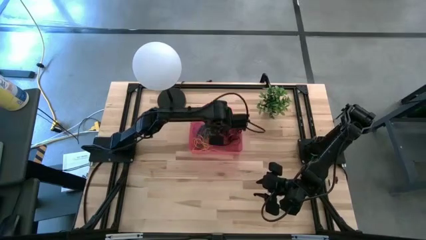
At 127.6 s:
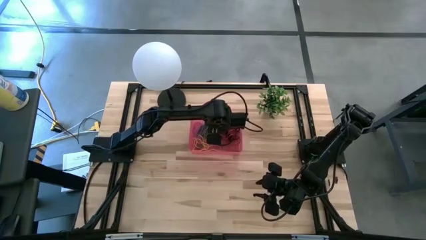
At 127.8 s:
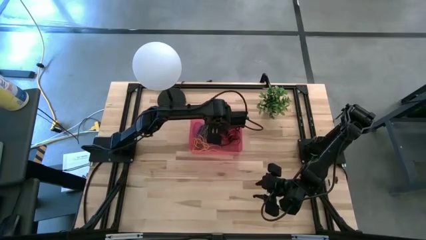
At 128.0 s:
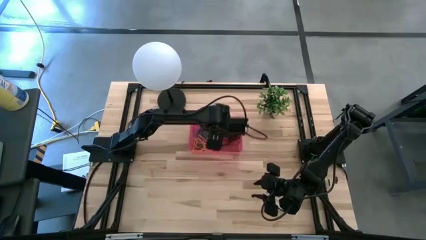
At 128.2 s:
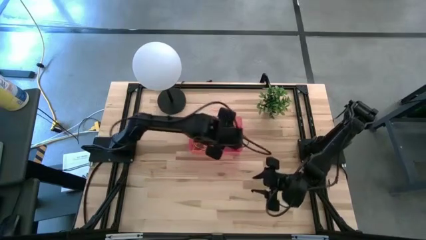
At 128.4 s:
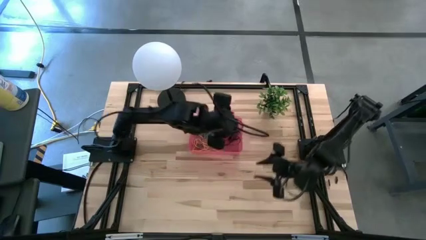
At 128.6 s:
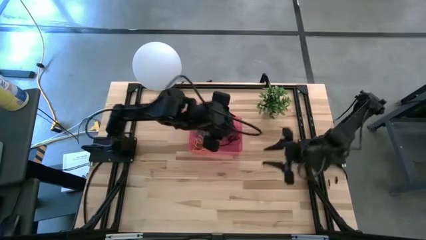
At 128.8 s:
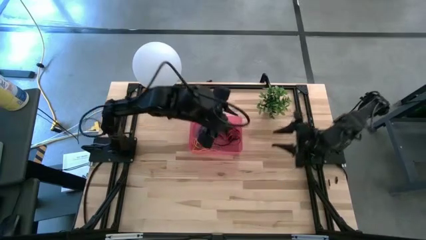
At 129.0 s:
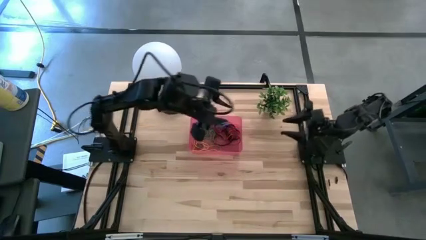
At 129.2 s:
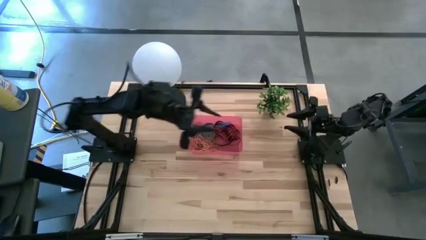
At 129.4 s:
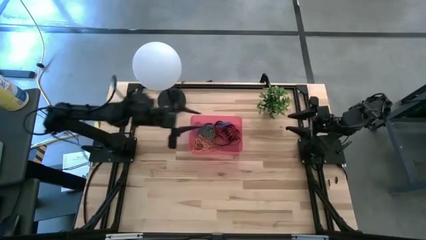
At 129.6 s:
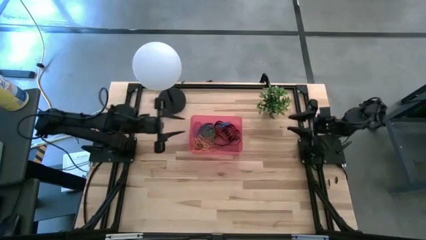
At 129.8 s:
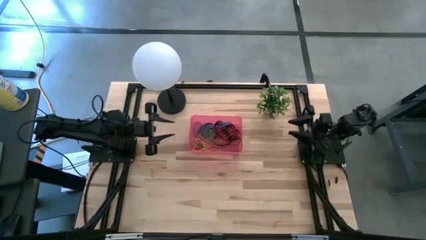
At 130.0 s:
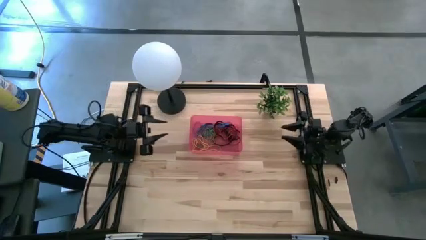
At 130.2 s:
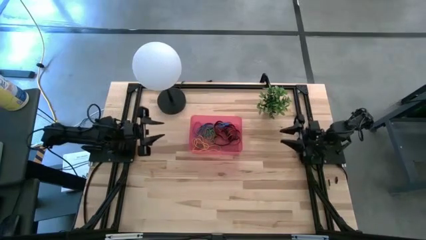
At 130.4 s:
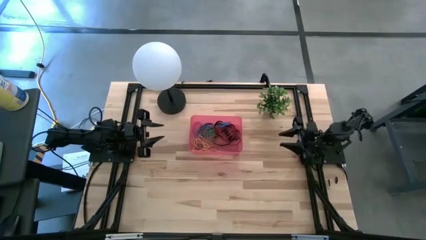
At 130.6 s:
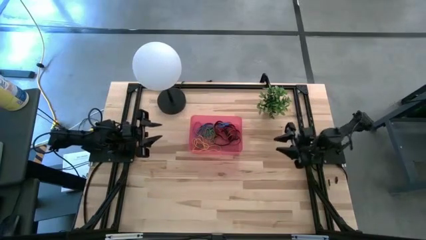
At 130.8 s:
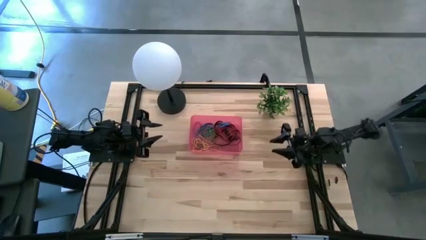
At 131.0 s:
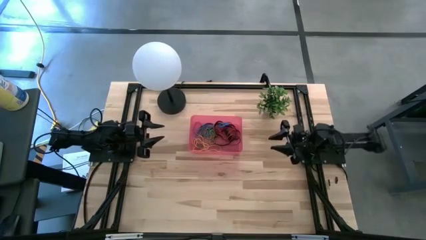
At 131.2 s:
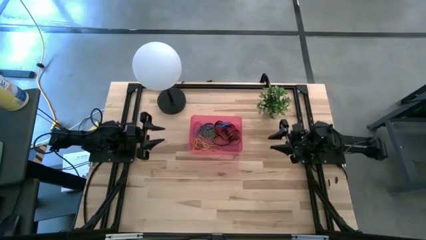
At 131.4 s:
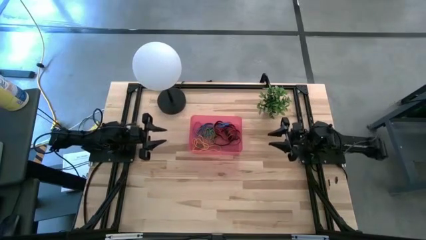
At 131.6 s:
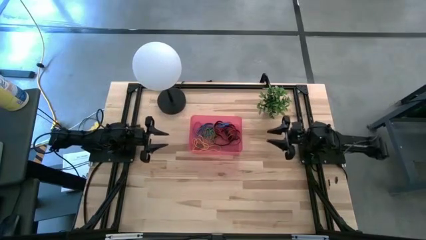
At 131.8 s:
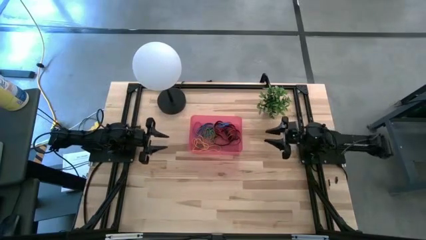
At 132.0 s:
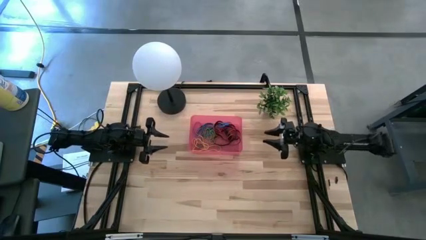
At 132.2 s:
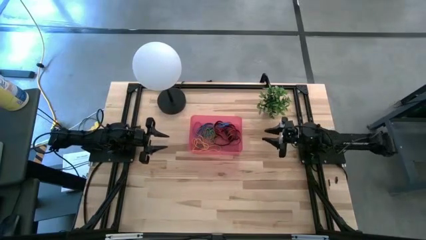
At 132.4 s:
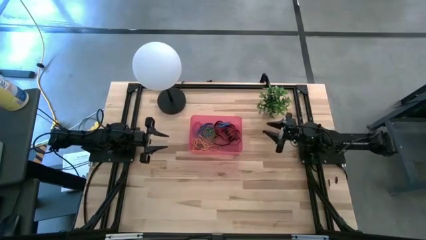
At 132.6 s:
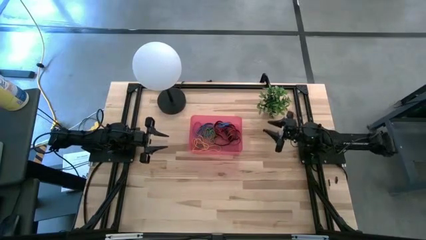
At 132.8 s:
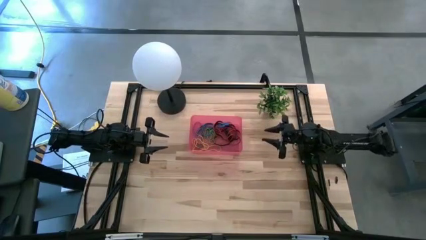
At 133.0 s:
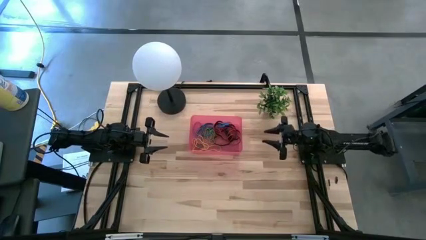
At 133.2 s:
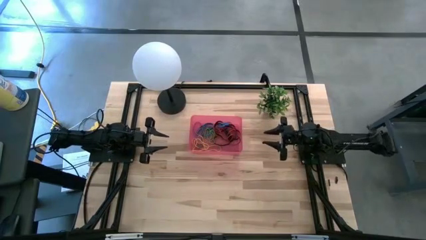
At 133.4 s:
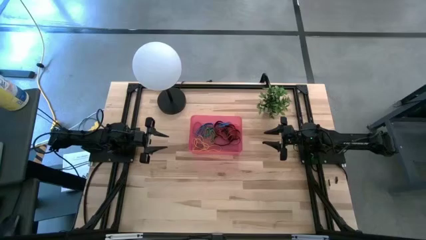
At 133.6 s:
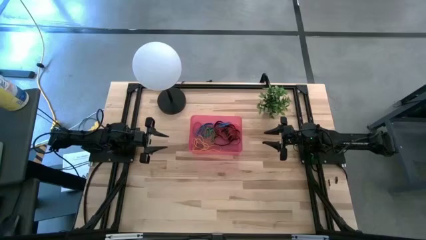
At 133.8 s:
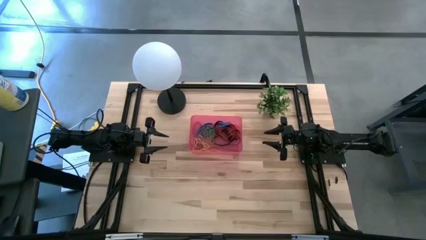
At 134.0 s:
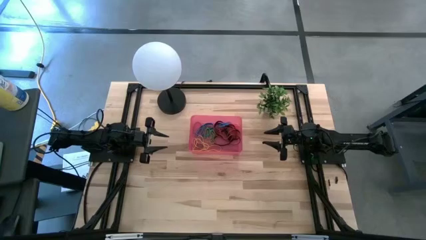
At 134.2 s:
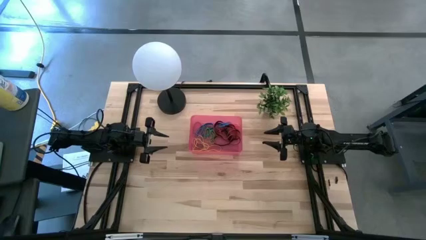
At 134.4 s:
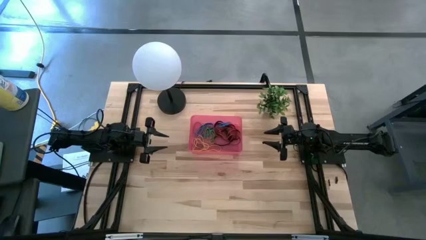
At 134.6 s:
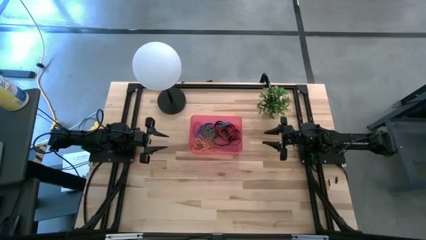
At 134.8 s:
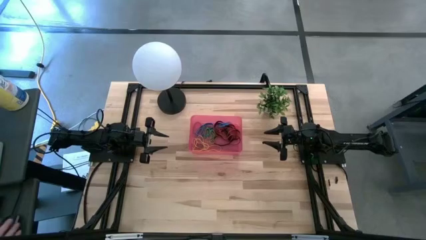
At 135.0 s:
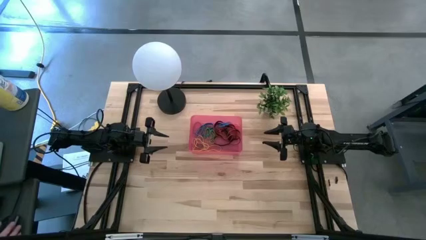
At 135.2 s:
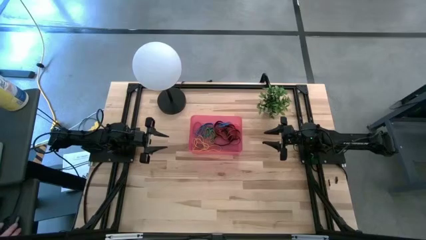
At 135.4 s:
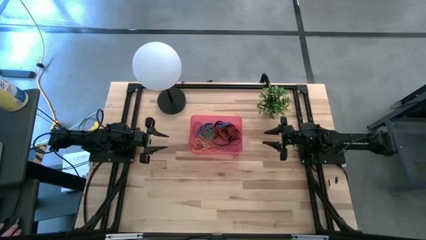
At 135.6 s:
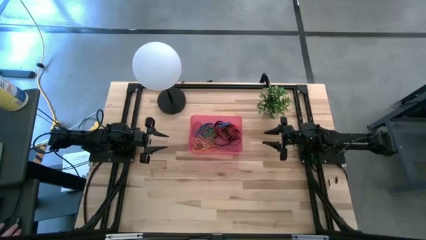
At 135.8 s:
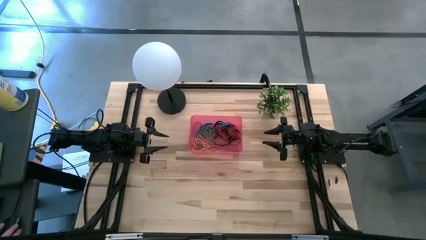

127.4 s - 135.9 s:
Task: Pick and place rubber bands into bin
Return to Home Position

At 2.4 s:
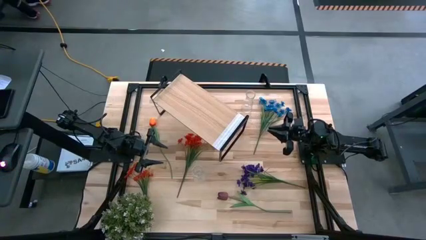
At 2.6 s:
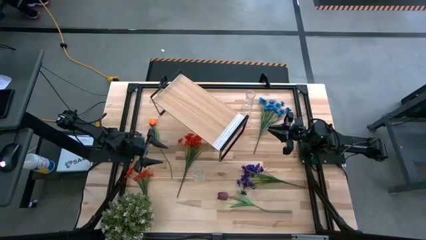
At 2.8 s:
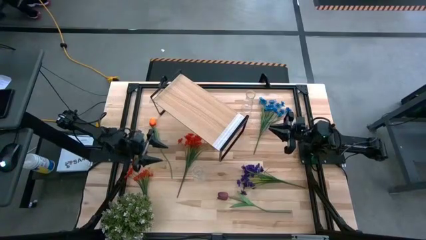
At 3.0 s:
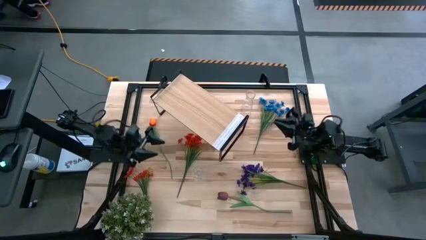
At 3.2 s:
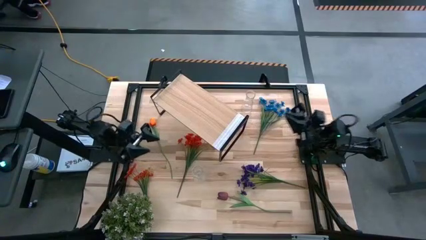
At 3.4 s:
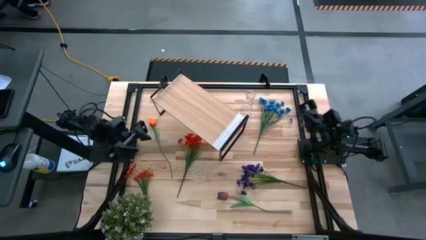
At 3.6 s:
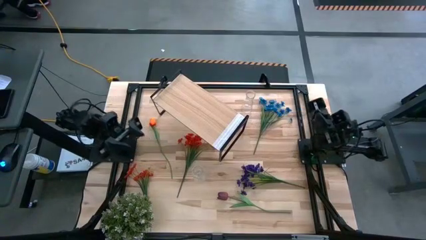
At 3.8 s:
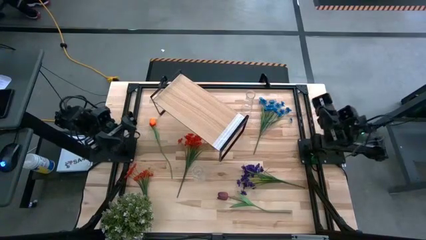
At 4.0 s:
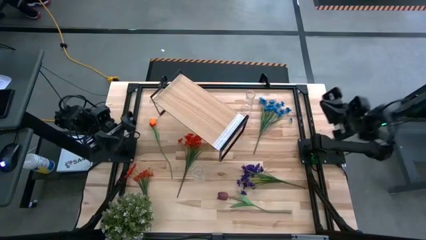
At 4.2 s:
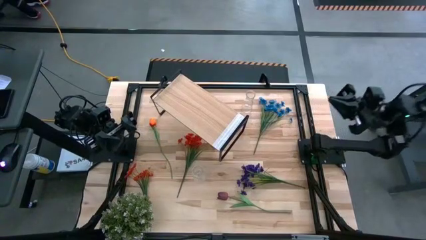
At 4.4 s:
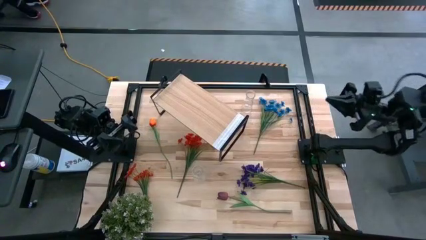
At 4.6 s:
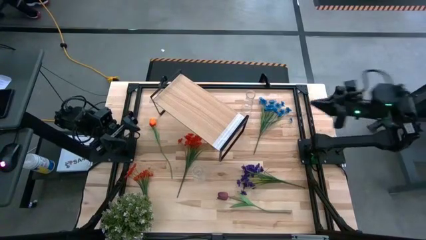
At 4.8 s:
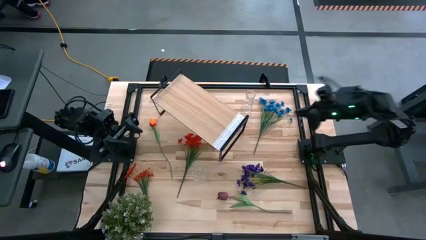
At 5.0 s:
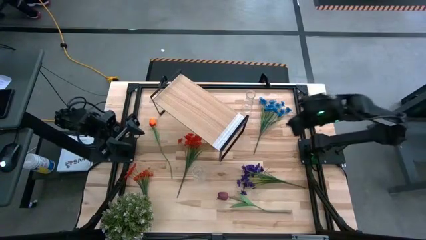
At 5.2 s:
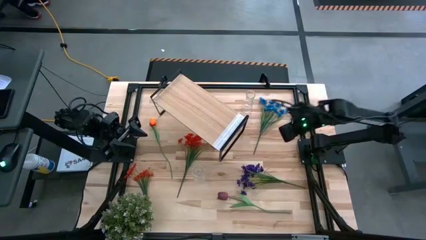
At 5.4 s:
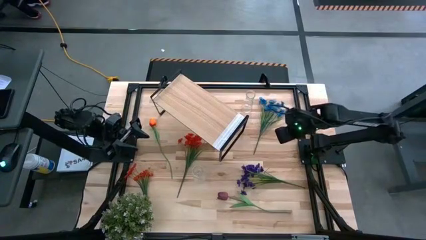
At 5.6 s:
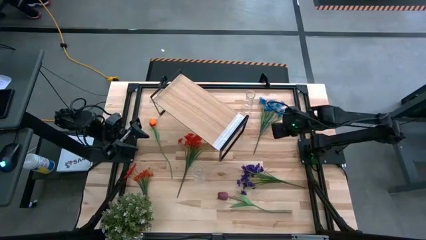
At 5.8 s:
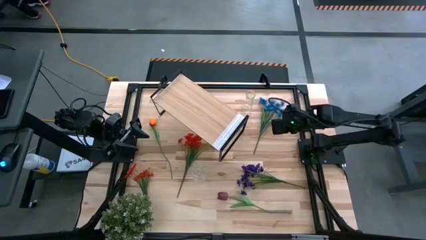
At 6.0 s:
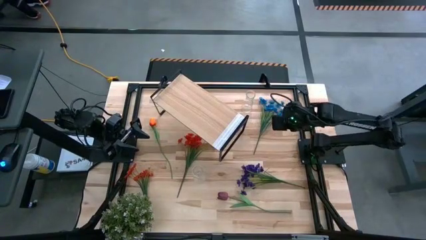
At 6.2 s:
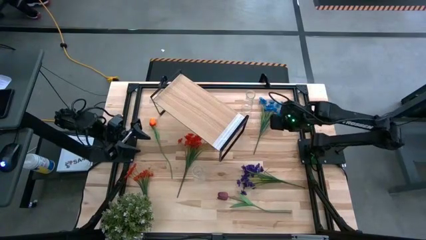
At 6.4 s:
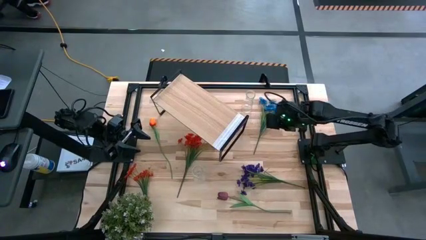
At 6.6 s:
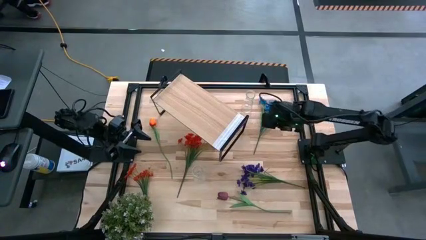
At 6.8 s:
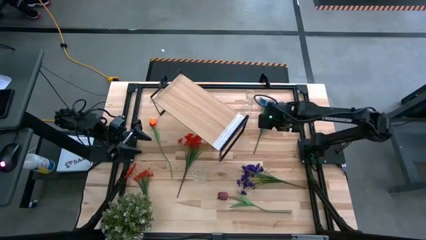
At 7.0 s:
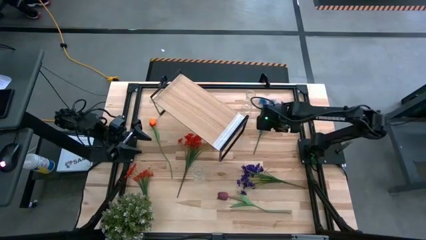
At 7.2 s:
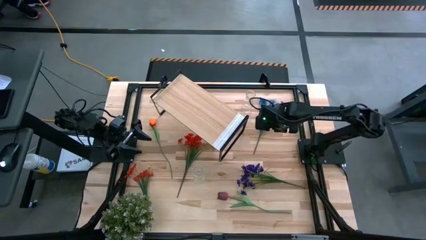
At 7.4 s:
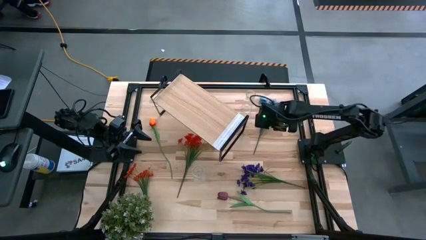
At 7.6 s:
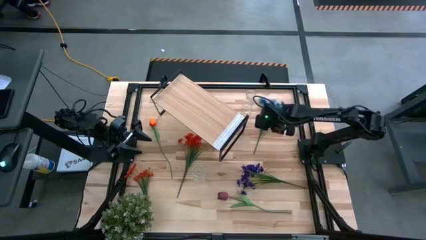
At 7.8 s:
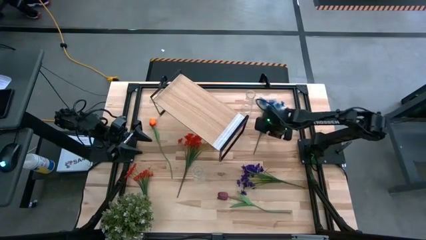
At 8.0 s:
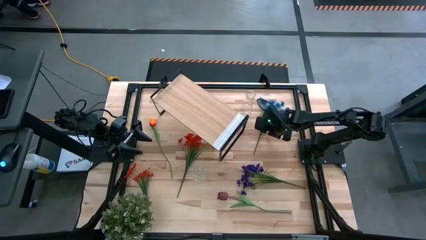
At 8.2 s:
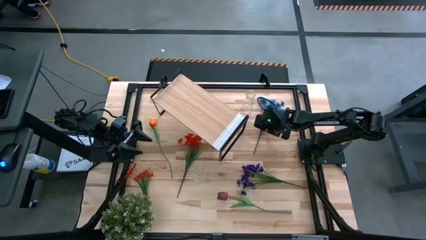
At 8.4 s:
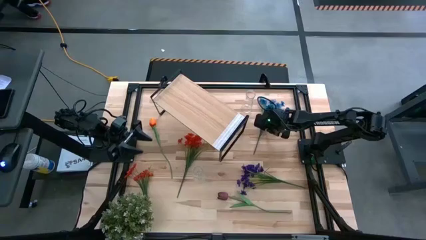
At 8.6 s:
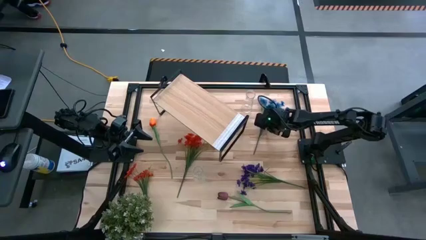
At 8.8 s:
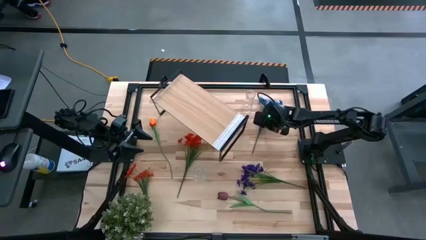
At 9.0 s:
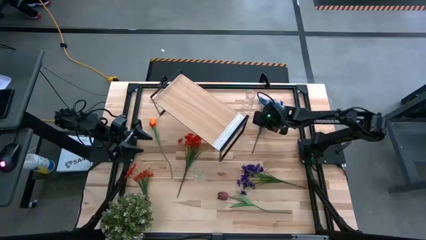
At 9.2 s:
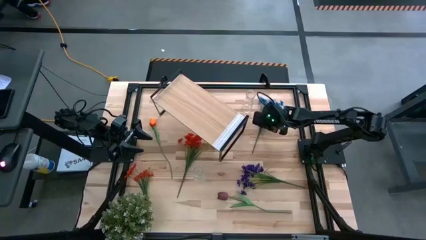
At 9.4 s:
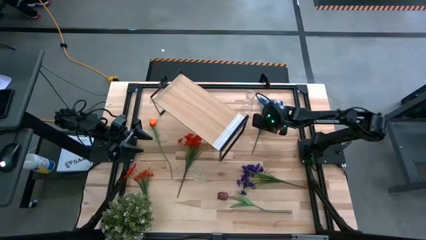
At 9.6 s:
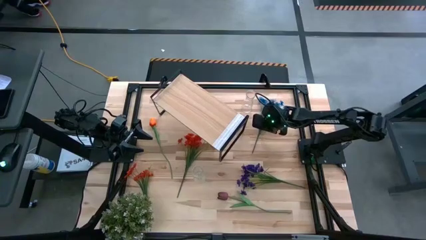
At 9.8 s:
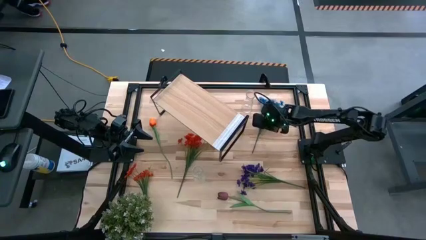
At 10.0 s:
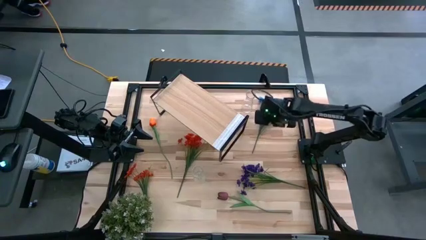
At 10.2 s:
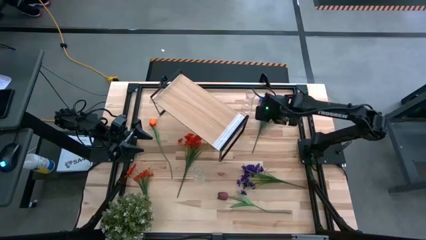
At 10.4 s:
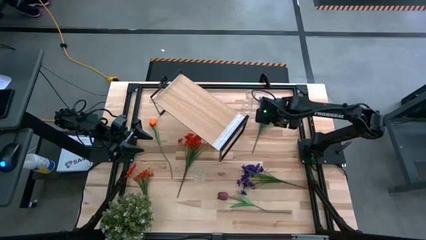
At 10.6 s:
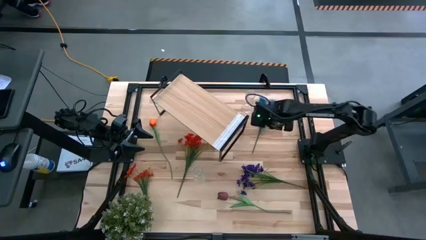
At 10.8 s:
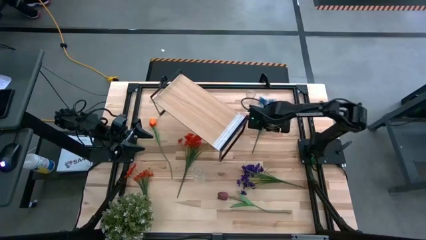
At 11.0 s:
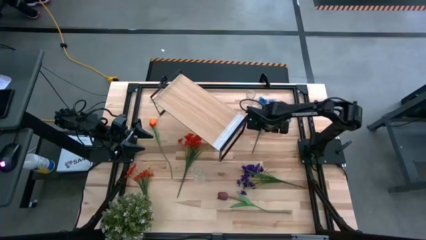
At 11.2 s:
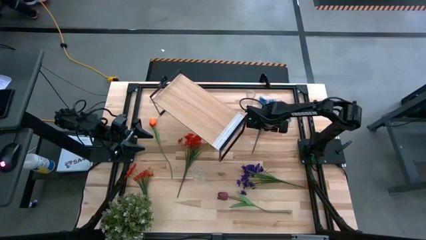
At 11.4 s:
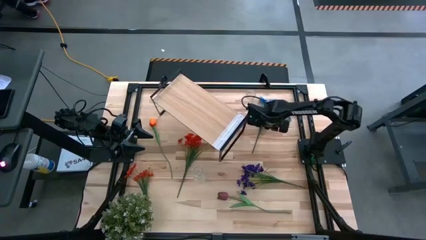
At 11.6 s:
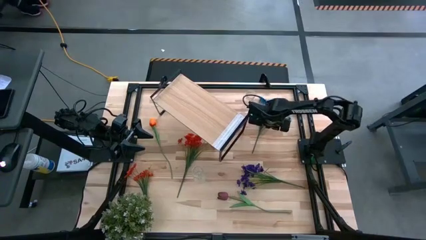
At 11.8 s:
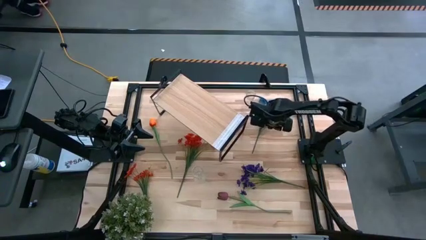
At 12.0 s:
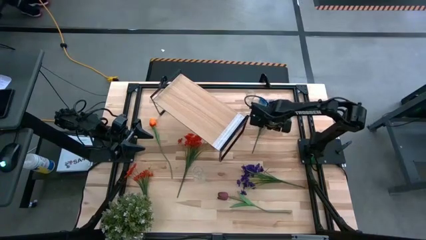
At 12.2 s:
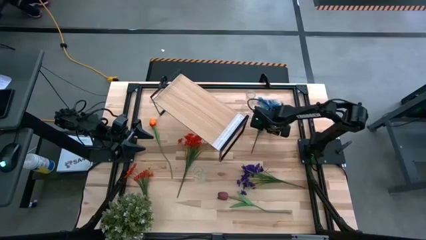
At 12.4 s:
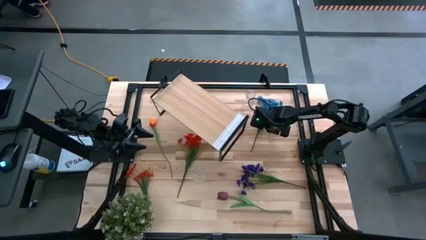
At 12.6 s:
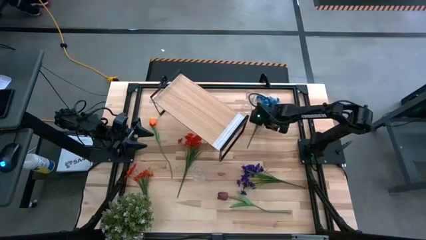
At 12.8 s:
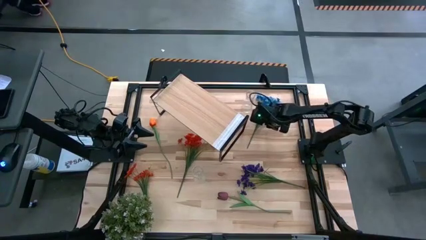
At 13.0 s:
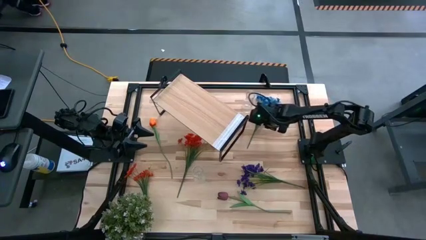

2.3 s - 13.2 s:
Task: Pick and place flowers into a vace then onto a shelf
Put the blue flowers into the top transparent flower vase
